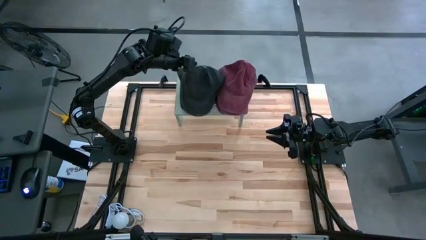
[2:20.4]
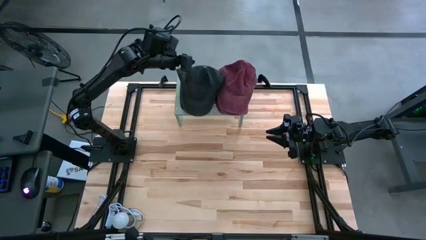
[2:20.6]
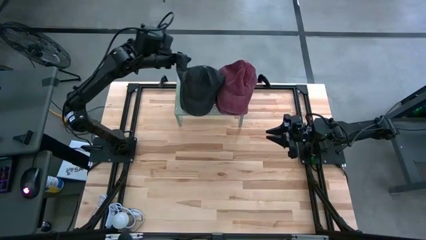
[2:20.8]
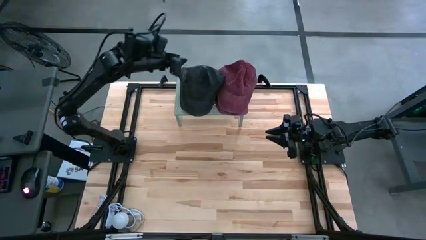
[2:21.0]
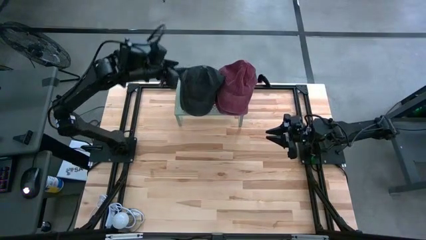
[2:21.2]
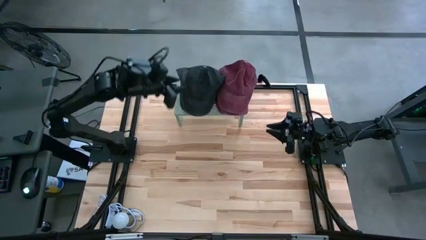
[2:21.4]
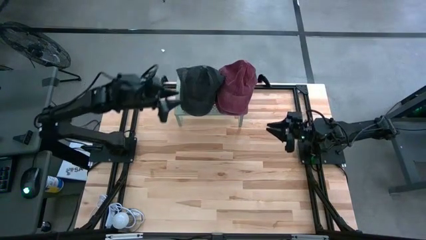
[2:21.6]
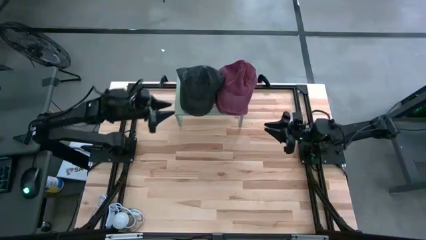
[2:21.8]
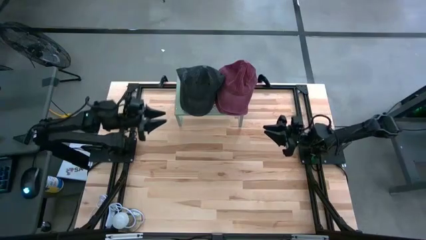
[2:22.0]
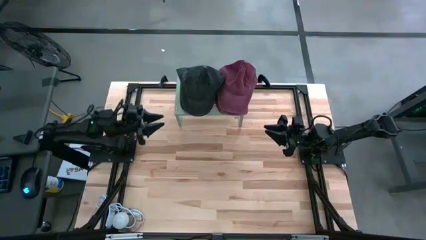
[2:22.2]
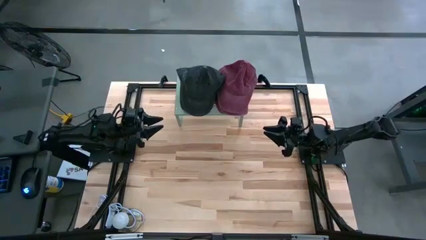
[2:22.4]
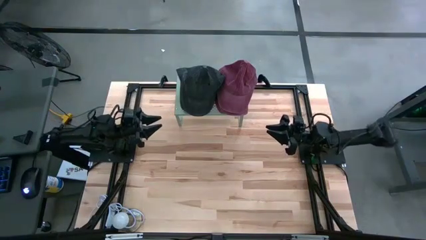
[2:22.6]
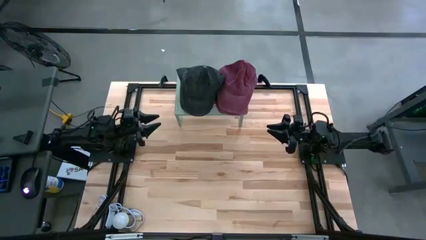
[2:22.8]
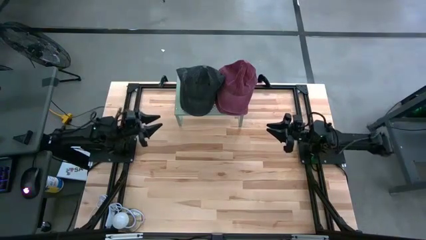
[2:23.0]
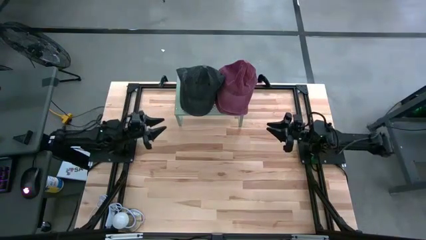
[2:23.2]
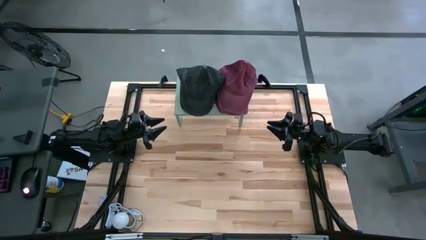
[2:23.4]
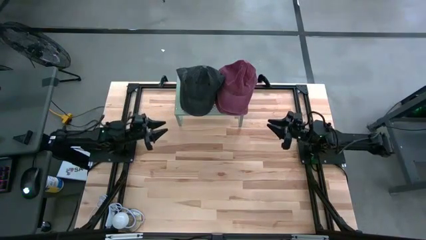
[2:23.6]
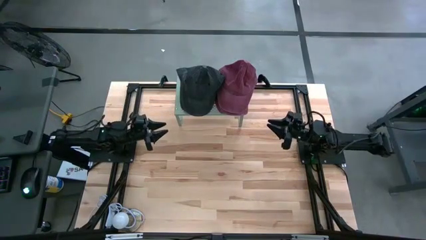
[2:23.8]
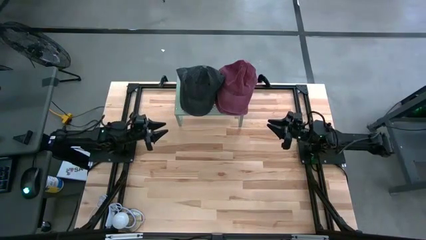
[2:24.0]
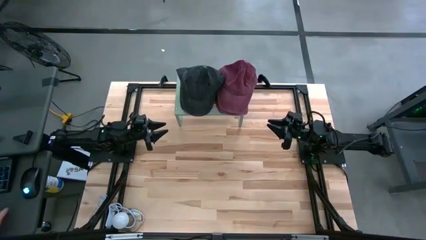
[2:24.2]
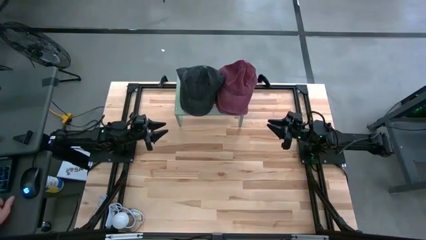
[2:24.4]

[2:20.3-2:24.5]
Task: Pick & Place hat
Return to Home Position

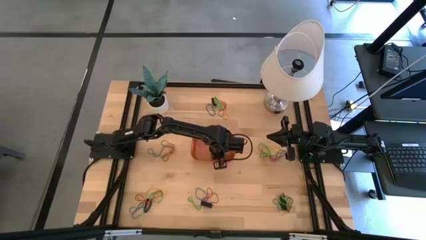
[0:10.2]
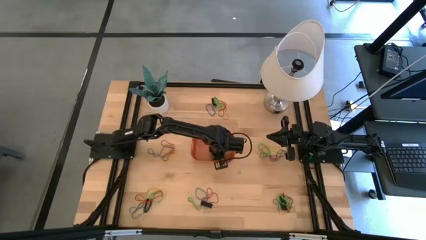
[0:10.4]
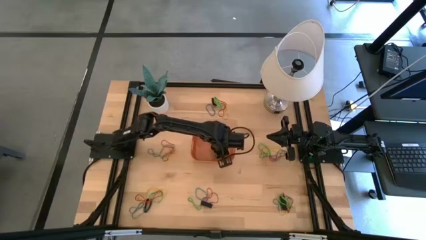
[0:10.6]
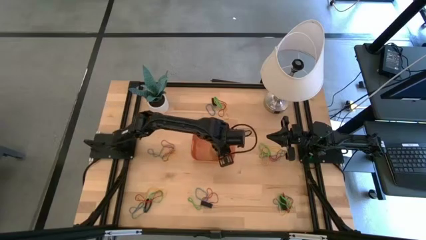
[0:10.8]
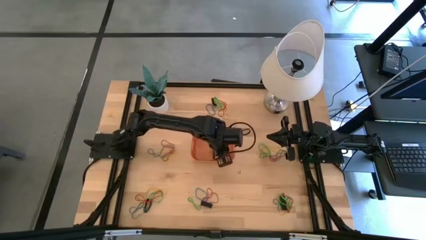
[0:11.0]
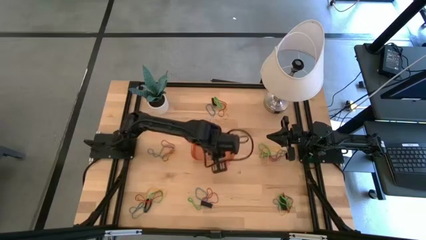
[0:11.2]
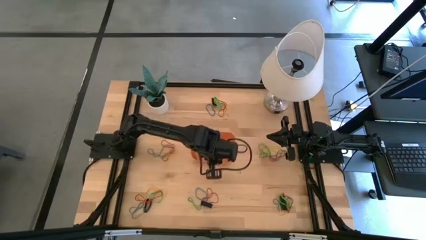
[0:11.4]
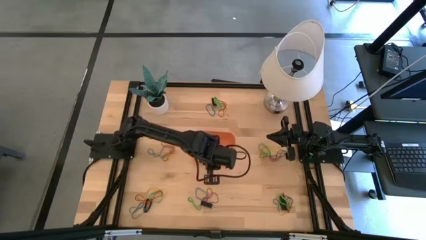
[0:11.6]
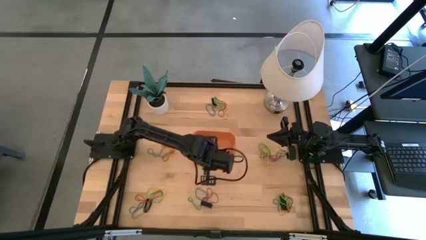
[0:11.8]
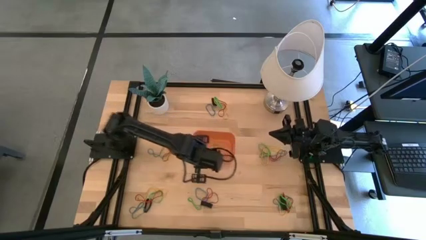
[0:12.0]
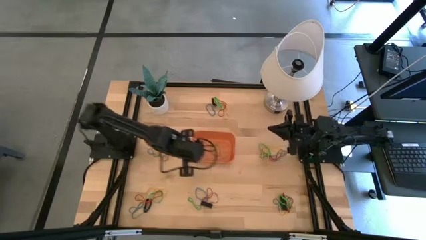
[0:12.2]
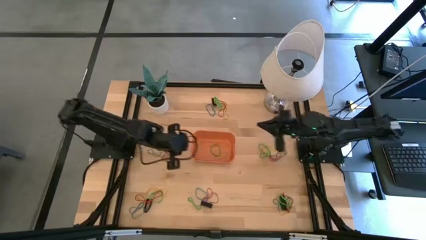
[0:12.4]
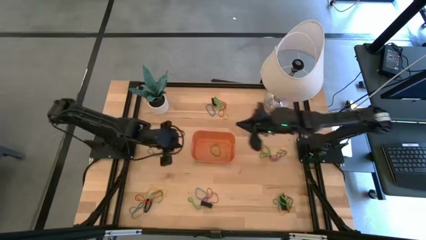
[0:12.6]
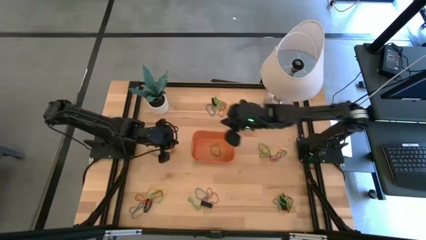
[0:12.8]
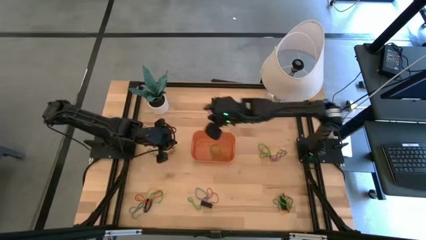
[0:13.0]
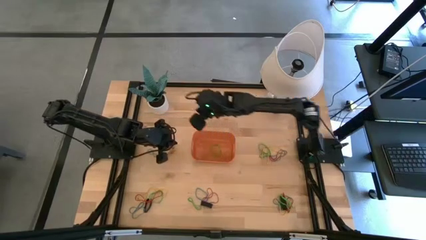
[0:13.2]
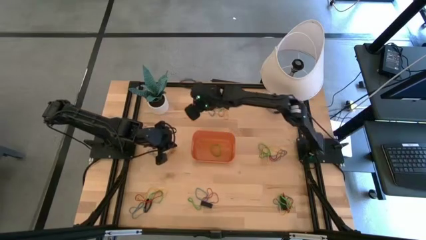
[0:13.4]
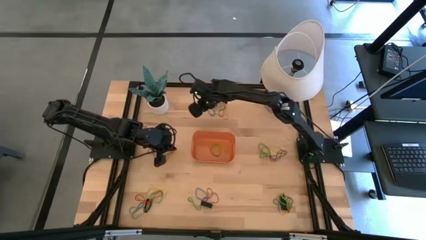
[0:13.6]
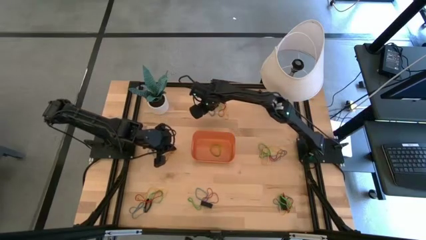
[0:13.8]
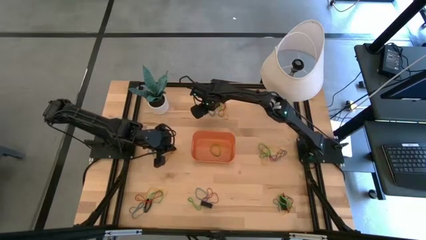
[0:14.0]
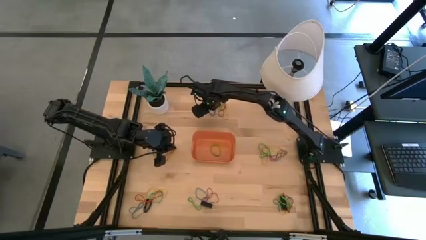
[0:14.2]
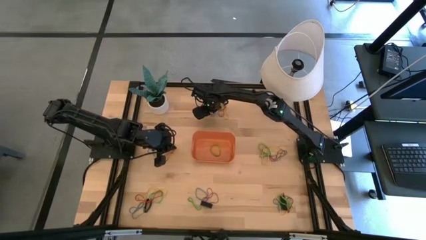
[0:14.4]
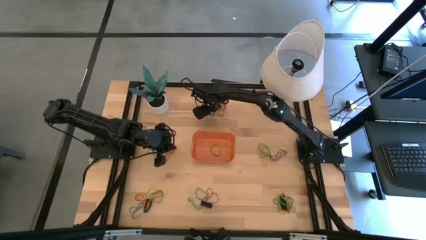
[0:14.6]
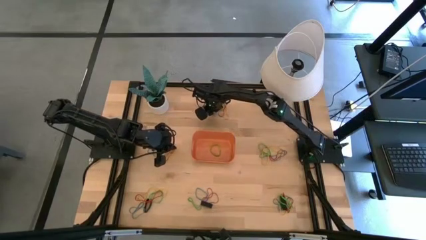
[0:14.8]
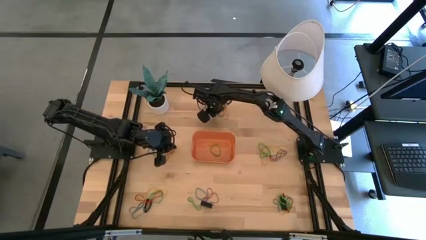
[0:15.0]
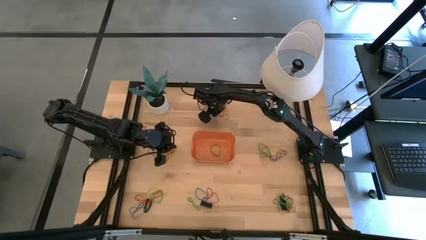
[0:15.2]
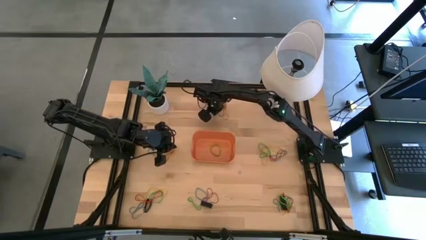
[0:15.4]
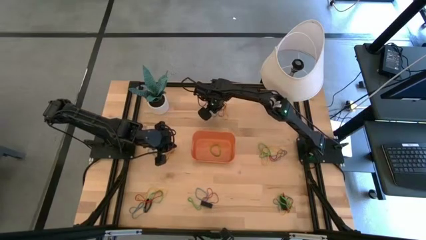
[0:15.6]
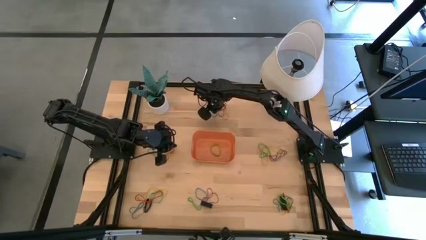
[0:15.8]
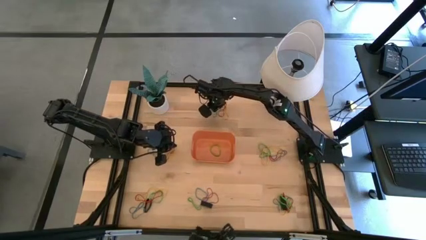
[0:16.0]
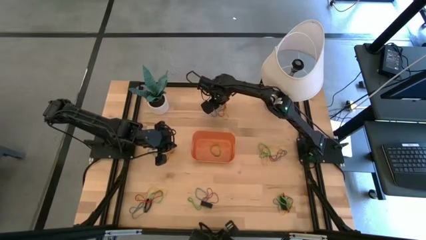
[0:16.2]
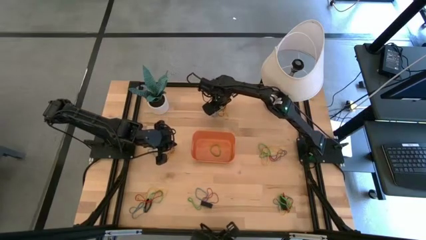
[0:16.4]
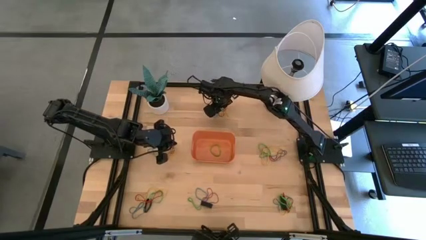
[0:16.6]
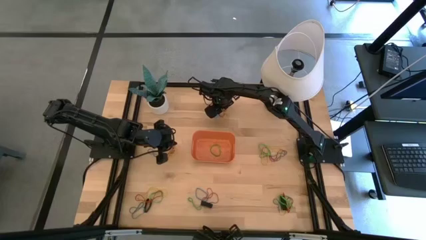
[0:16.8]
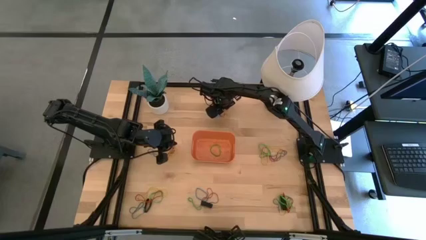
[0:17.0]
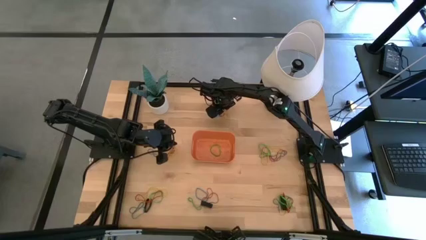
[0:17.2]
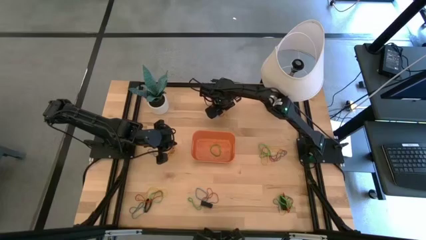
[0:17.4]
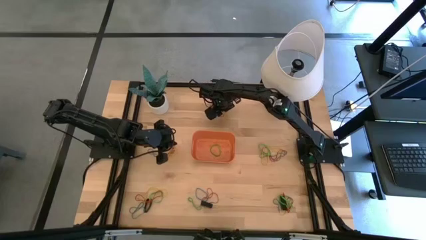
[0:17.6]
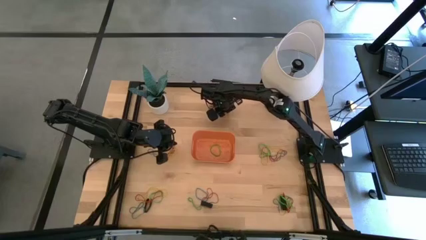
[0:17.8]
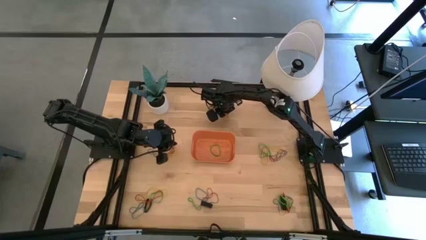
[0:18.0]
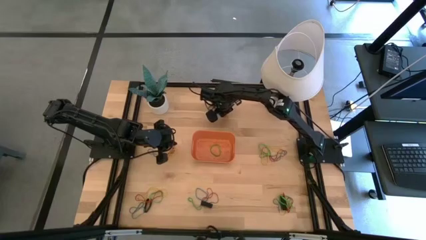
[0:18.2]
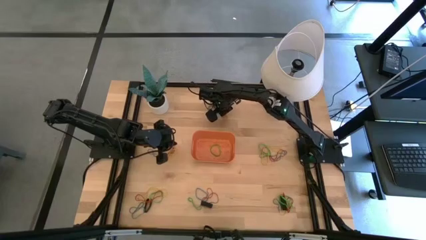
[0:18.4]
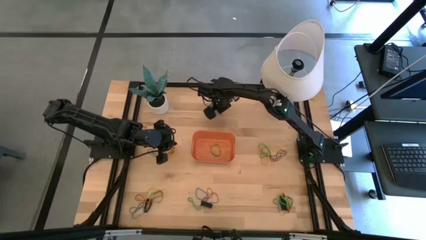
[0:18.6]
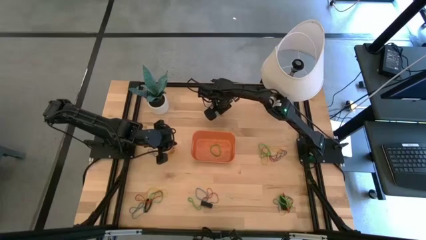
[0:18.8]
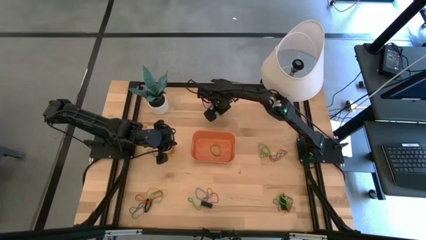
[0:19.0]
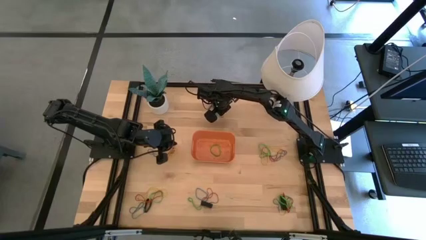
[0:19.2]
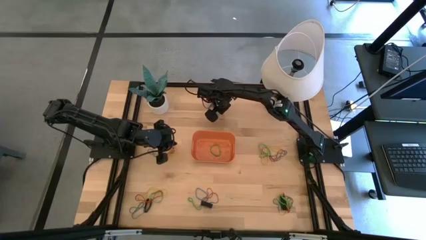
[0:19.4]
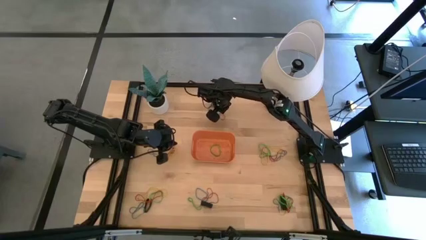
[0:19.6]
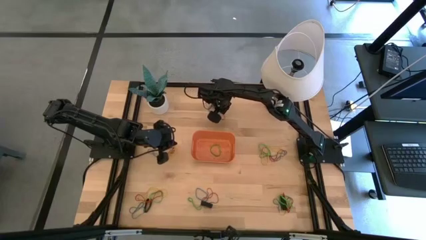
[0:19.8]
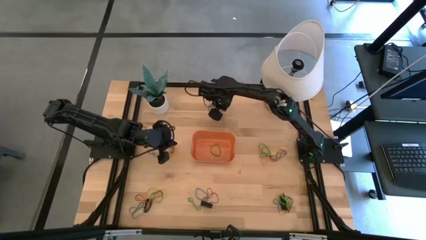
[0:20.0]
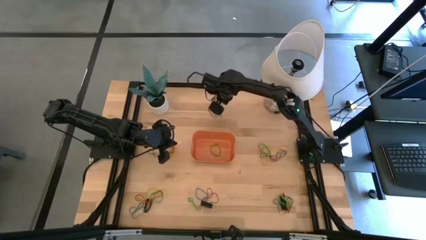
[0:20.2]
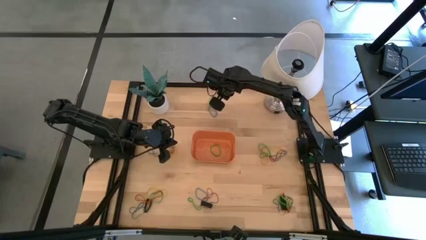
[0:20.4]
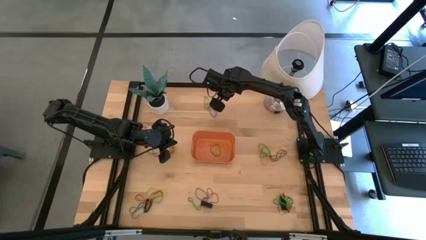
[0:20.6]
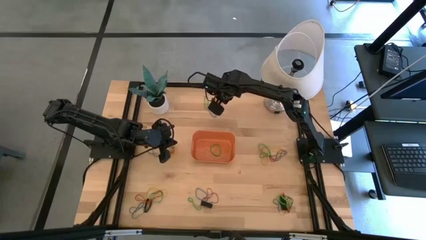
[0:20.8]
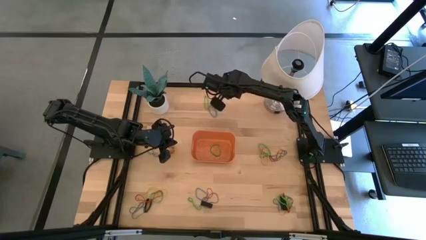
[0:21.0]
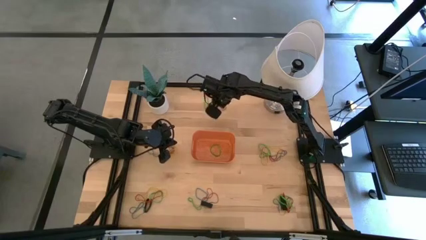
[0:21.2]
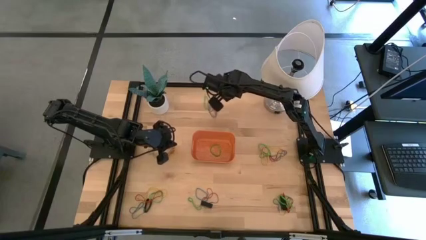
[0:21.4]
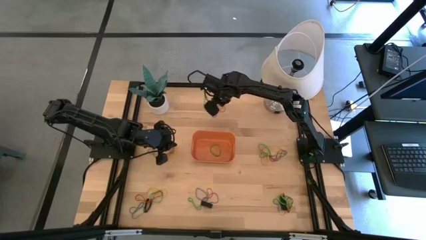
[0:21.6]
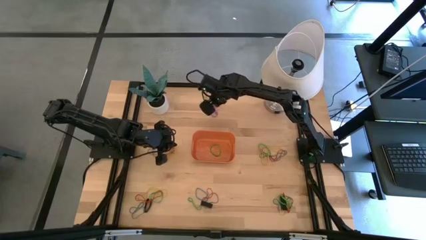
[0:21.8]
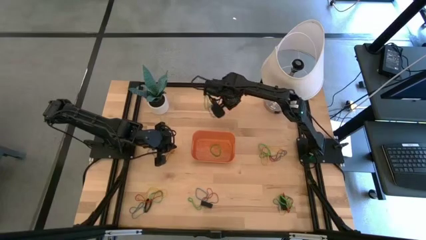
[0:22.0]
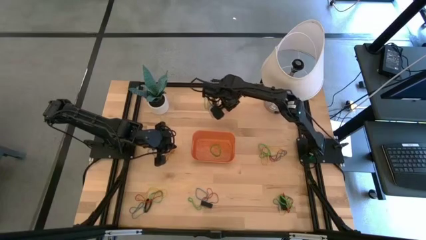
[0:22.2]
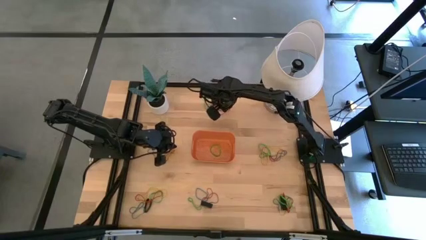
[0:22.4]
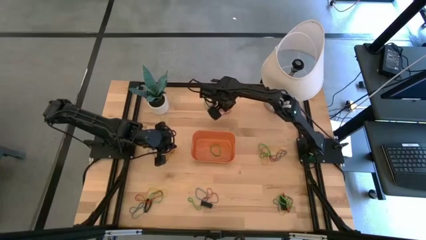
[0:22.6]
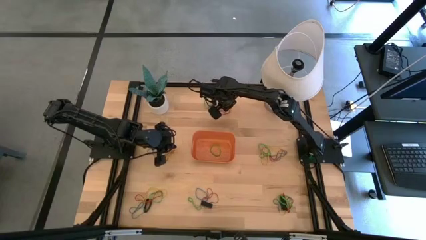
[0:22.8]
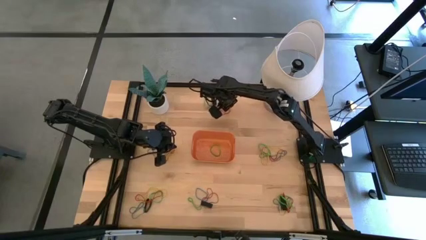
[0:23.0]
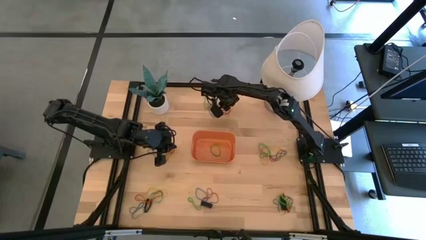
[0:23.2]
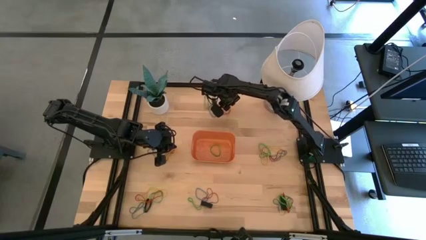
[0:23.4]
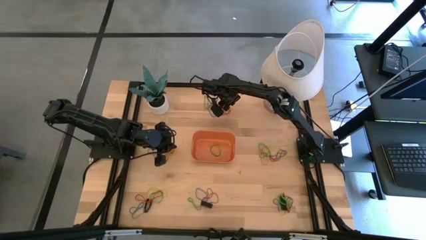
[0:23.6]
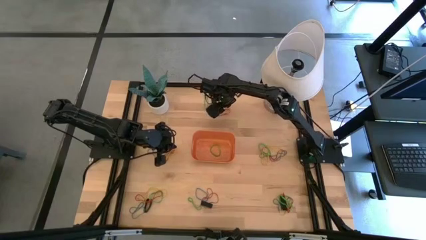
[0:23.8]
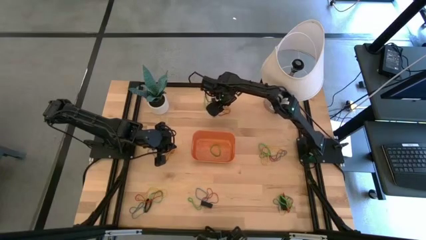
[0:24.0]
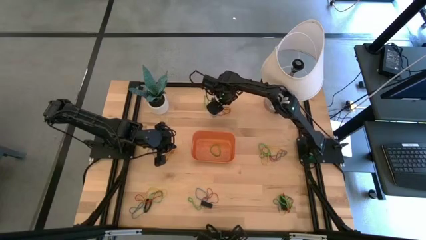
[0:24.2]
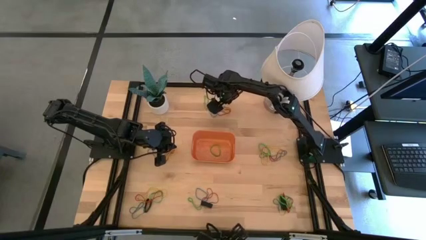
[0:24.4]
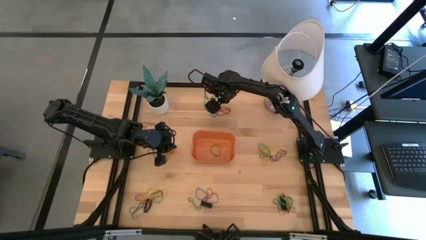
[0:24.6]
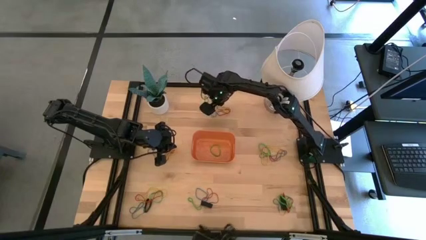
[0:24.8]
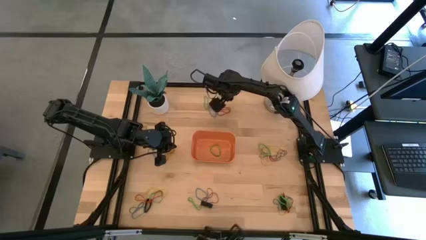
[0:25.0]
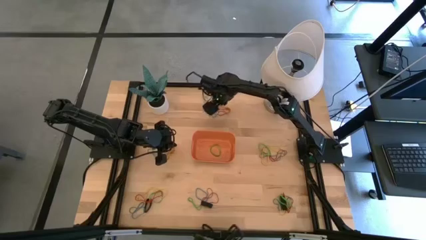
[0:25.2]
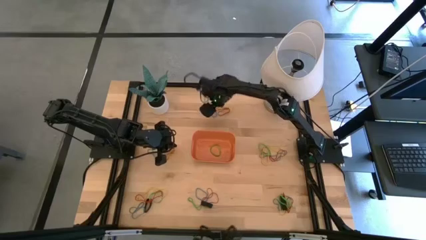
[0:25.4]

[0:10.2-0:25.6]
Task: Pick and place rubber bands into bin
Put the red rubber band into the orange bin
